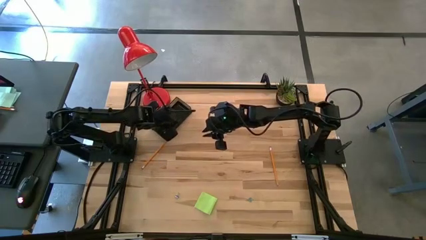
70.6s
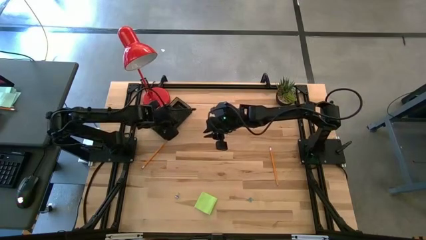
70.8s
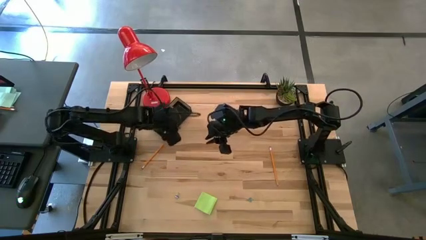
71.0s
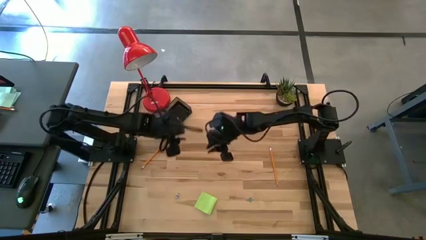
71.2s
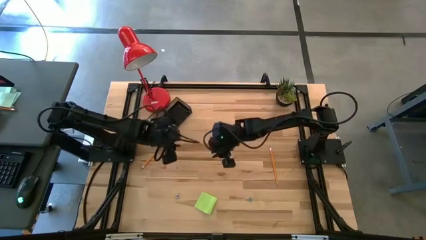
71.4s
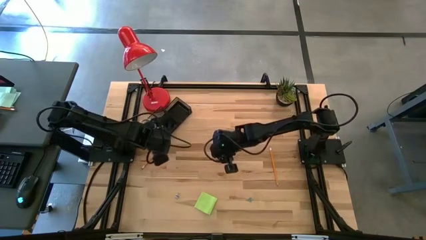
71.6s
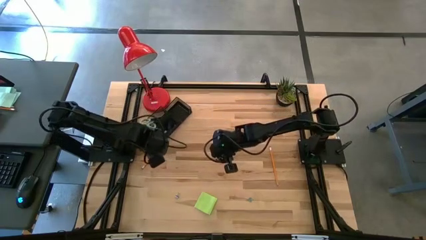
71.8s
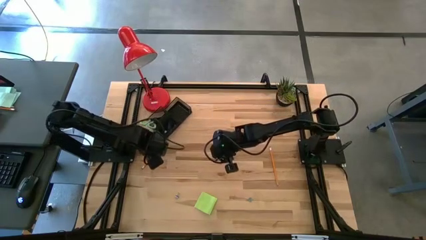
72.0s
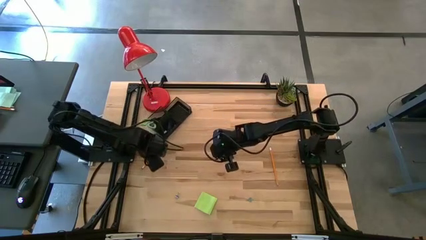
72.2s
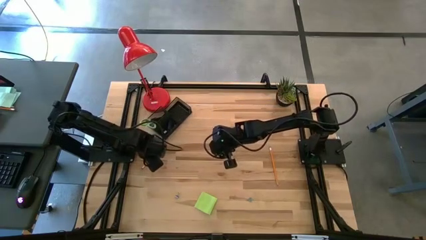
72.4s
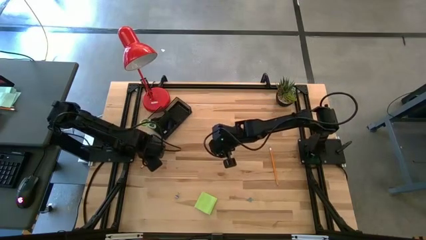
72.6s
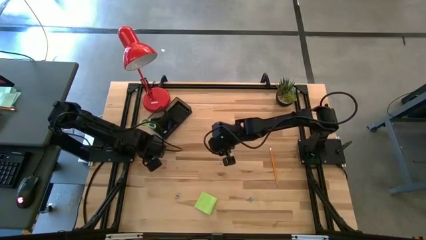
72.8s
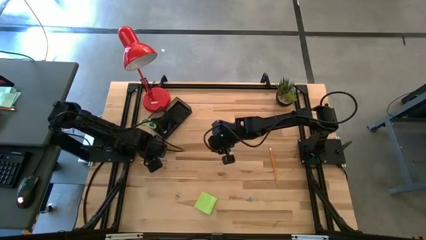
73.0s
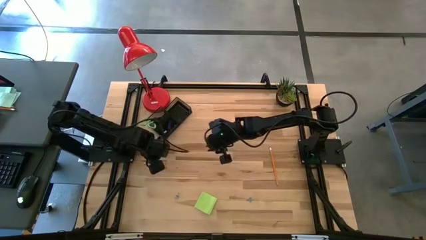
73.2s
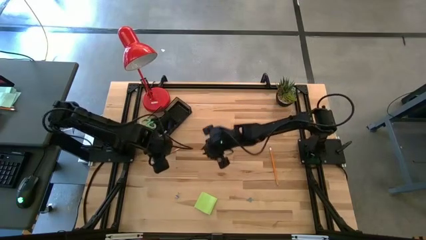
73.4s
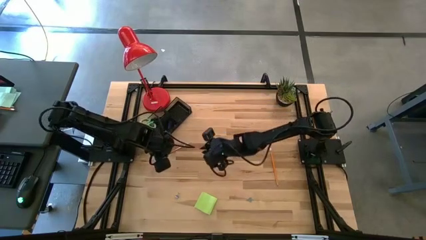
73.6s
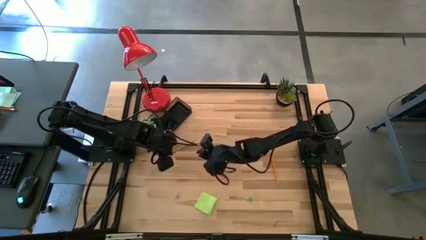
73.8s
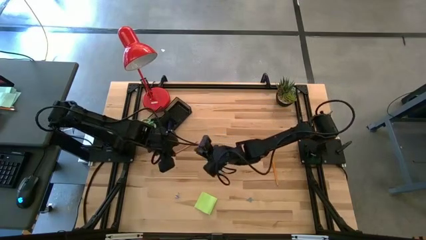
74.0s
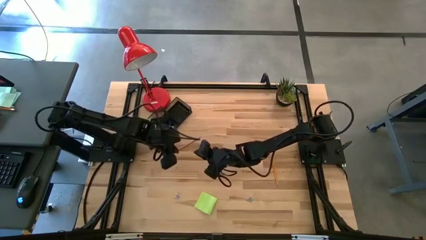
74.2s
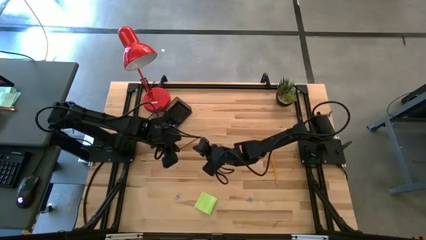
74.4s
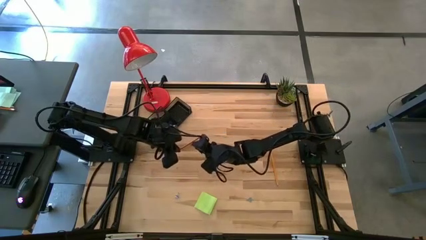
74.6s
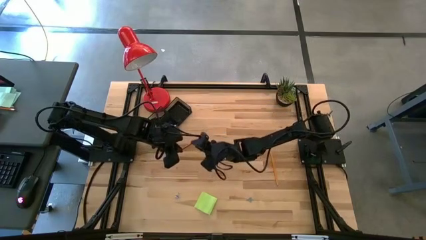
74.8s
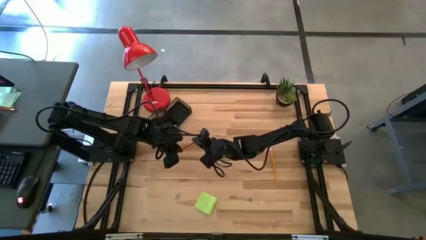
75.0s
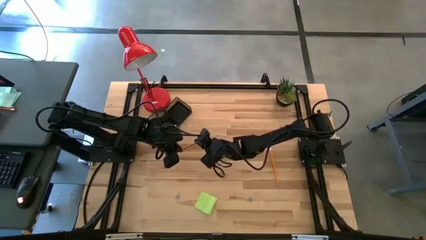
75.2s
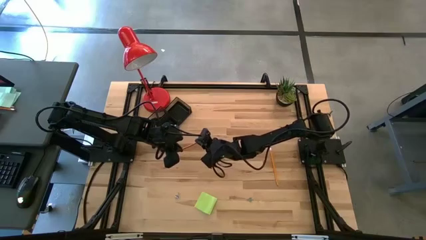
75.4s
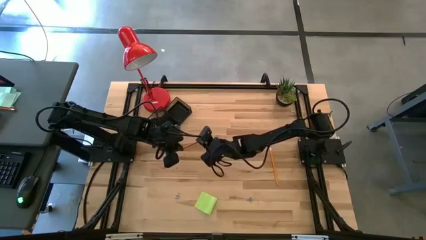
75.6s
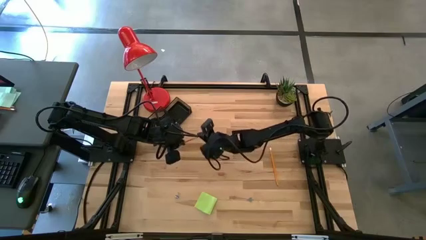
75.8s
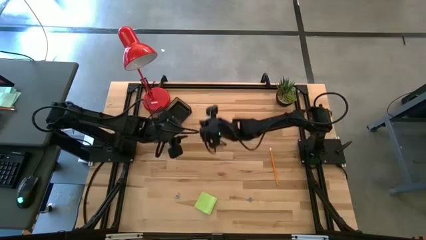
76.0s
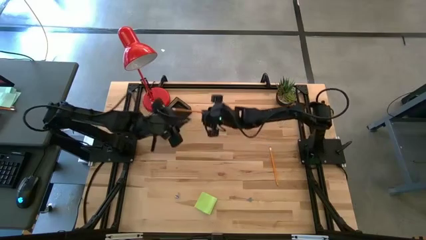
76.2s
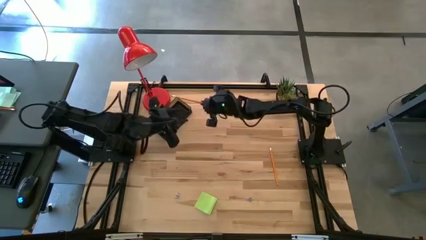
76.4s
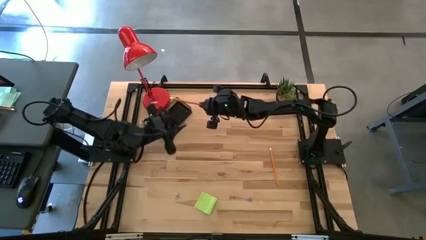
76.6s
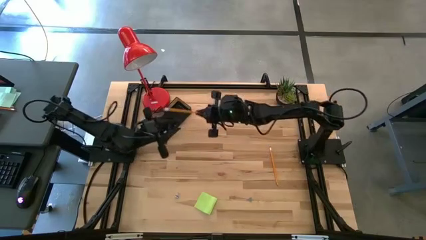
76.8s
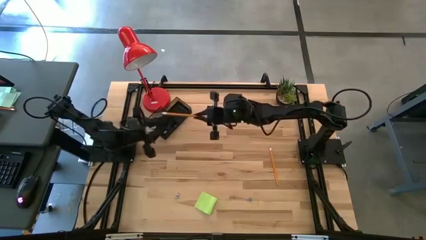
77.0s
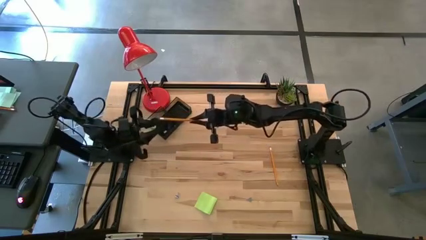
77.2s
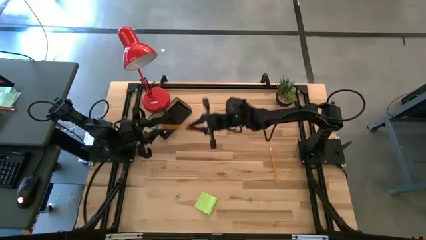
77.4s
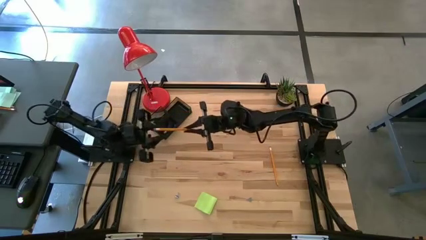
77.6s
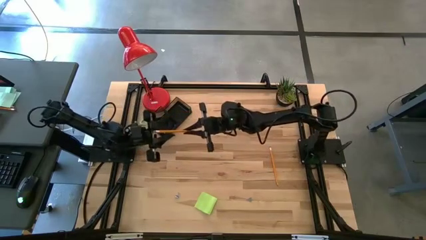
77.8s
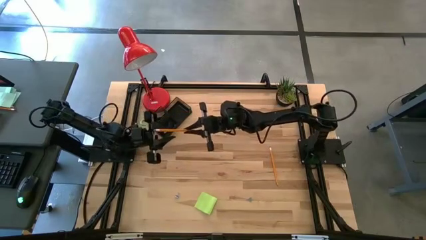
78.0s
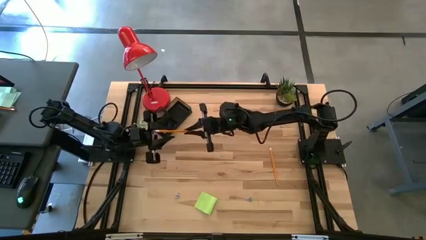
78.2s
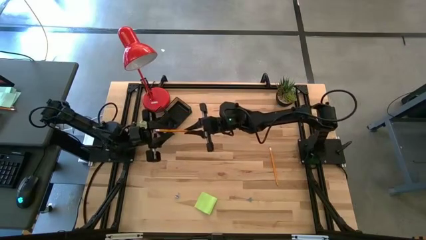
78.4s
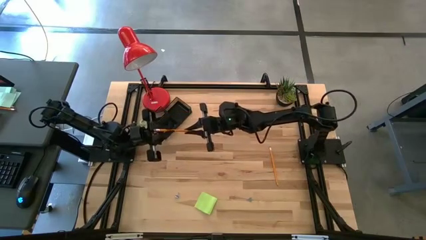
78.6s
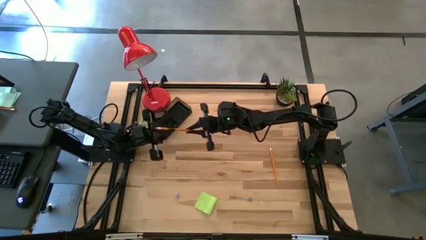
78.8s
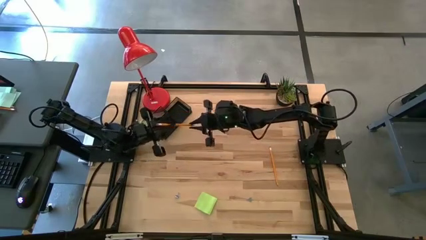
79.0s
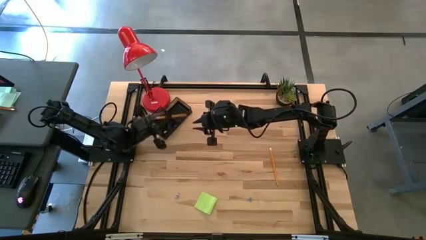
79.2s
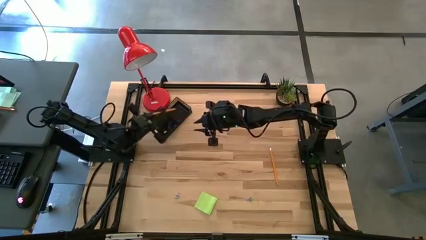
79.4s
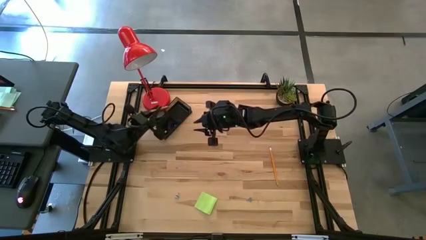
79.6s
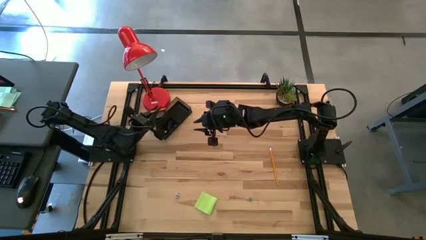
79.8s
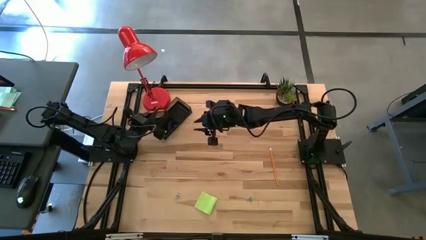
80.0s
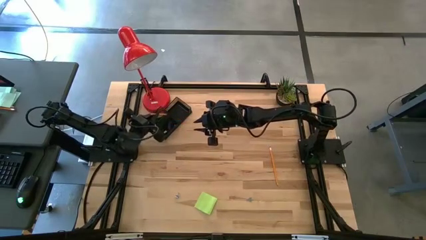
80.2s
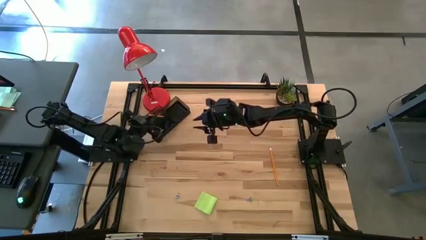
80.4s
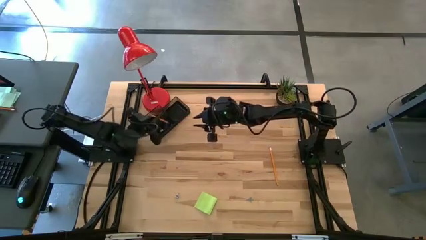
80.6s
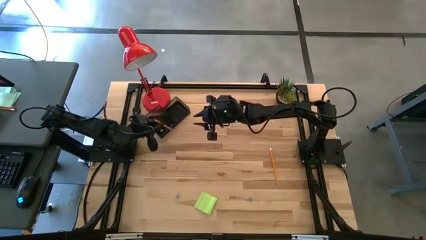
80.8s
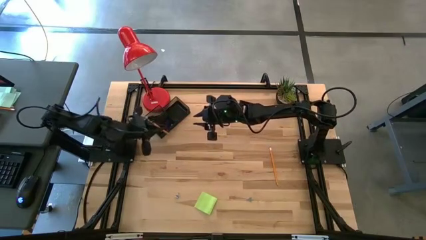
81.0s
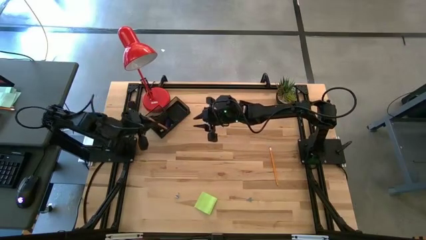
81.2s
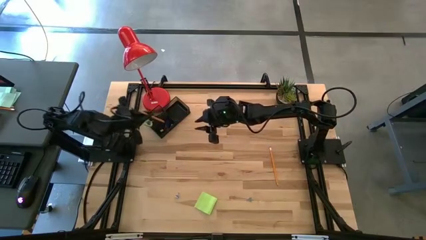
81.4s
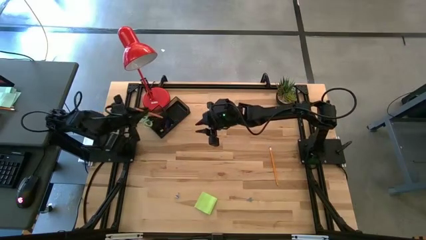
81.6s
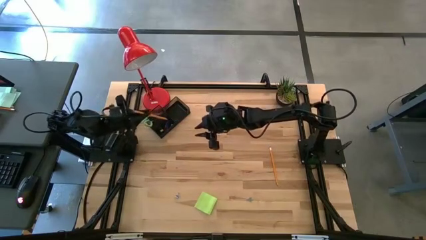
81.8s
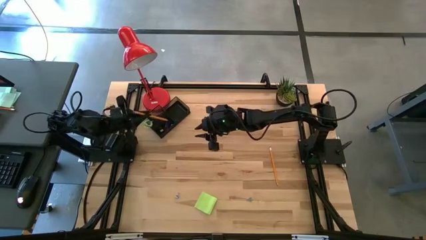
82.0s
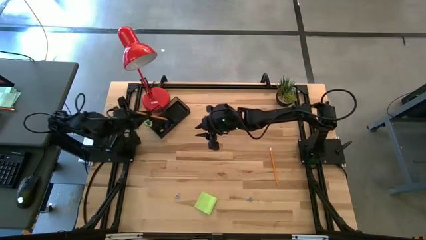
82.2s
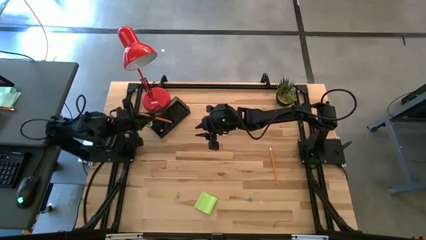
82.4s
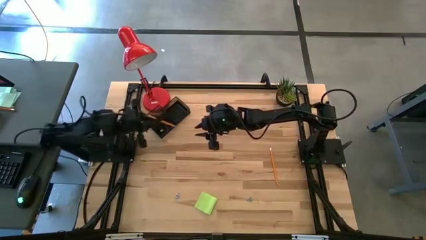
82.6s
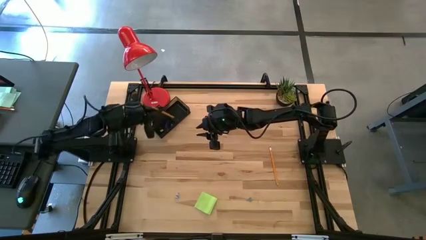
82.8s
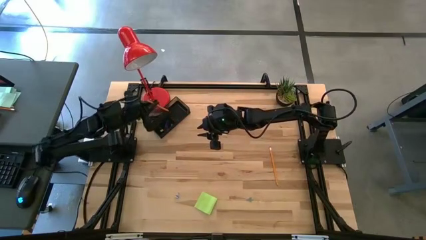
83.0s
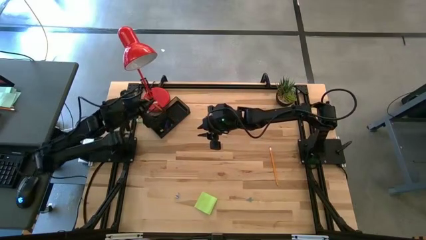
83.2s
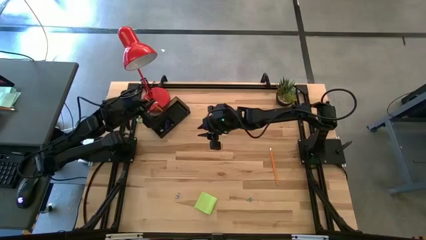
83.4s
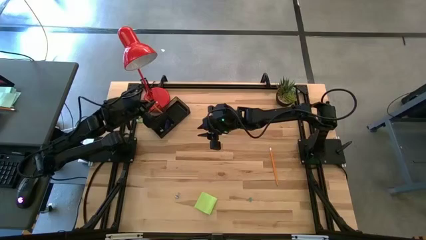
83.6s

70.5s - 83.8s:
Task: Pick and place office supplies into organizer
Put the left yellow pencil into the desk organizer

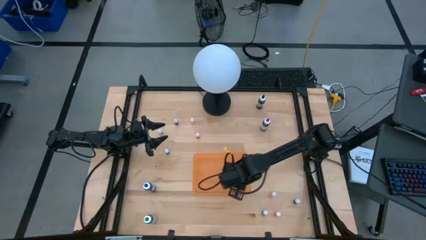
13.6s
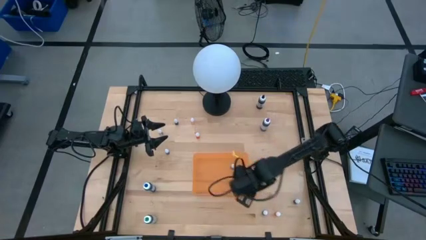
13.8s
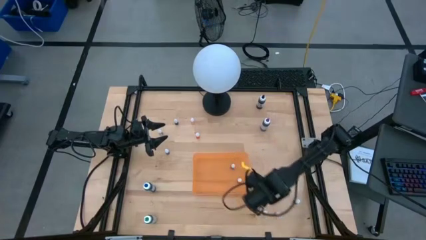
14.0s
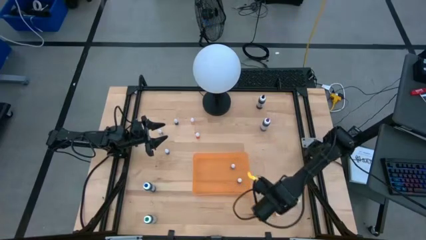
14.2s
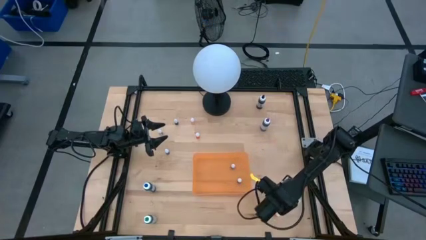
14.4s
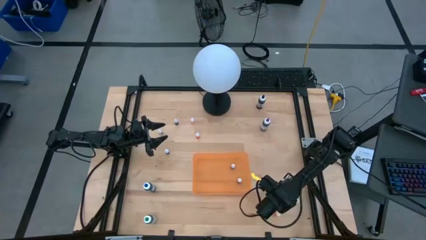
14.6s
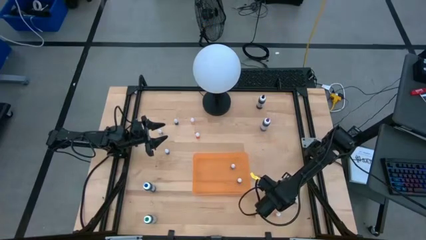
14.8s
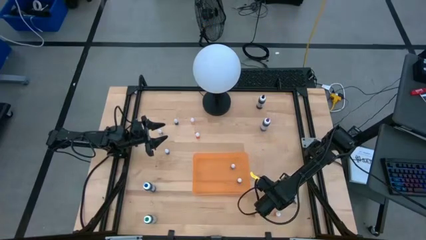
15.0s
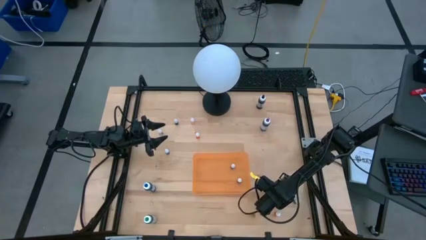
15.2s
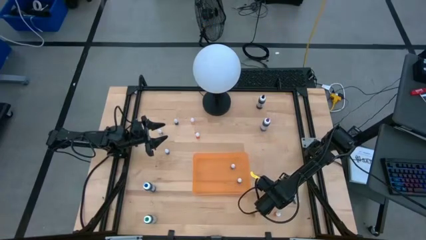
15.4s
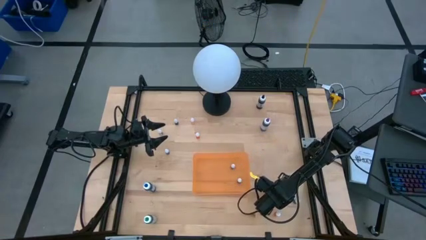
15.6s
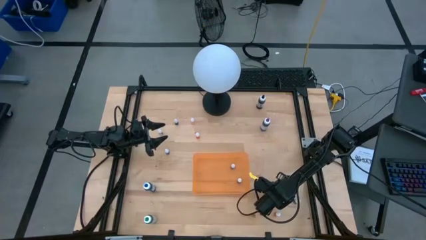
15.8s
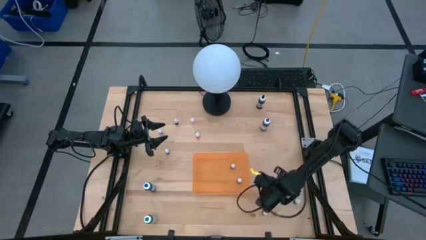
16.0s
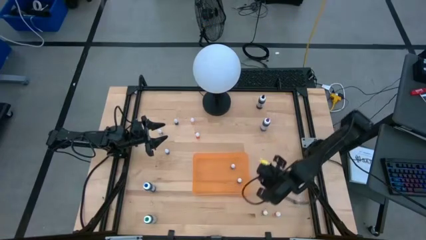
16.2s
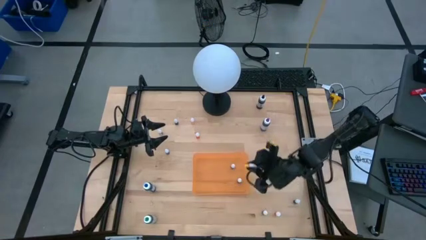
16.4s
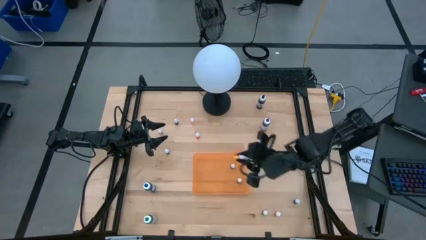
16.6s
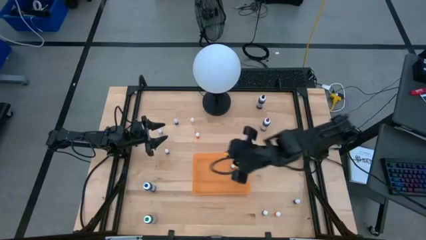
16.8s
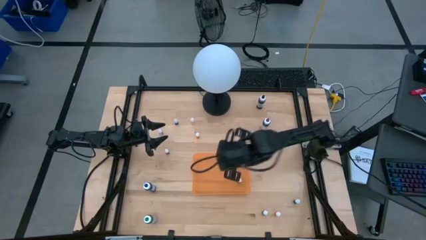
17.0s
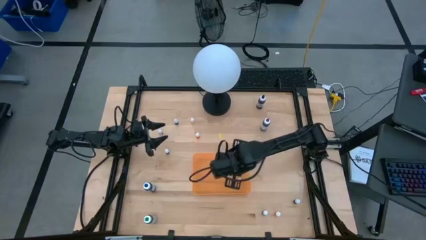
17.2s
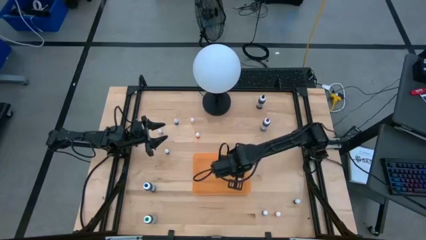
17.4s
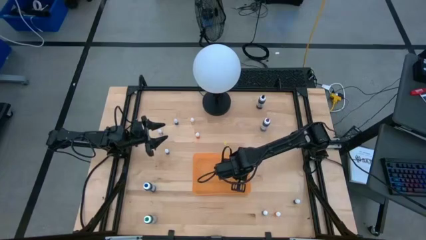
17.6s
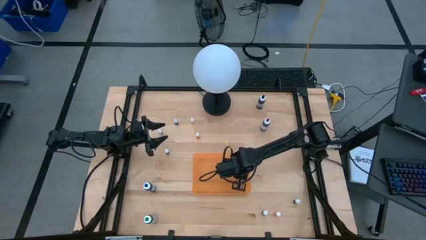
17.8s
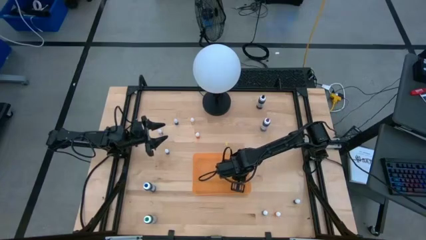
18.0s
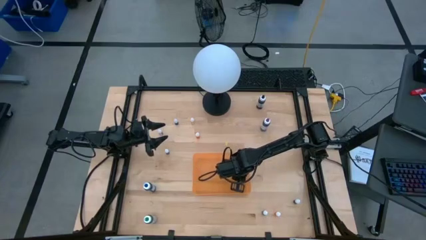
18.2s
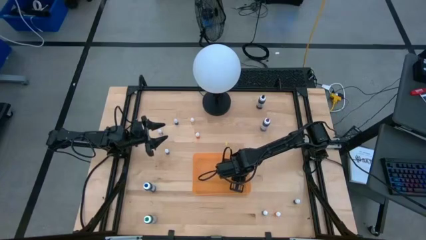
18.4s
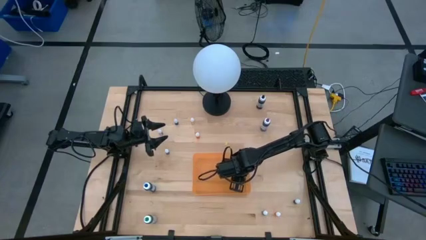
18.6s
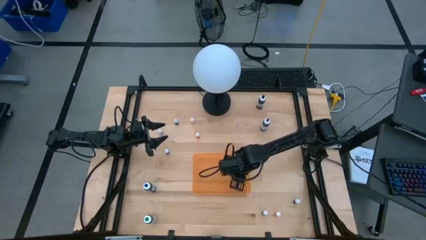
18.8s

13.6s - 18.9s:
Task: Pick & Place food coloring
Put the small orange food coloring bottle into the orange container
